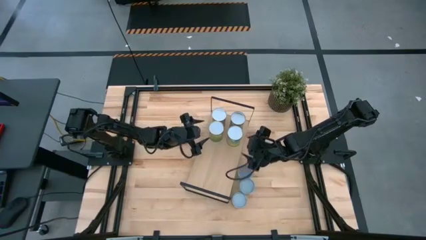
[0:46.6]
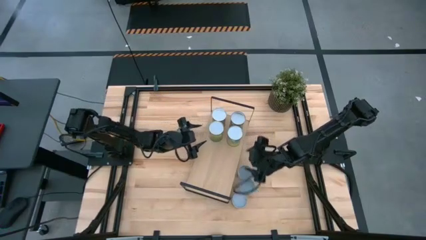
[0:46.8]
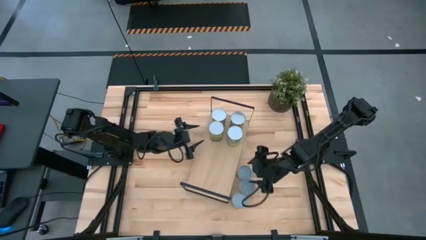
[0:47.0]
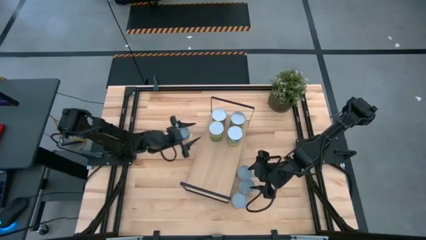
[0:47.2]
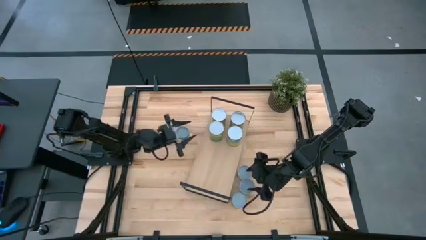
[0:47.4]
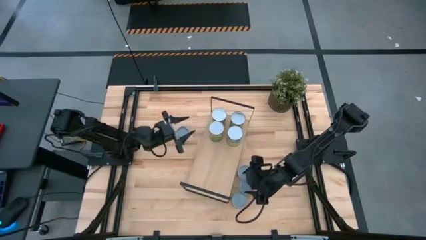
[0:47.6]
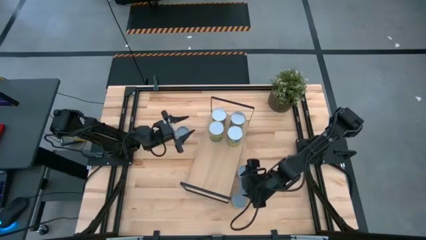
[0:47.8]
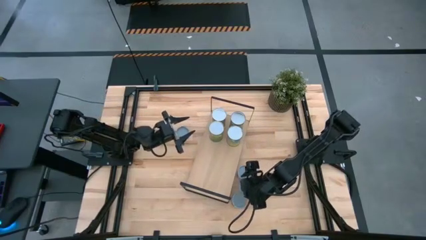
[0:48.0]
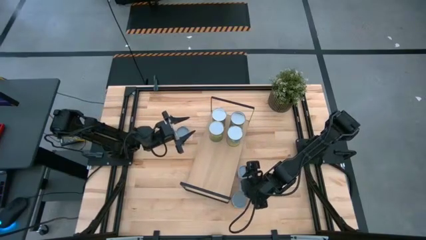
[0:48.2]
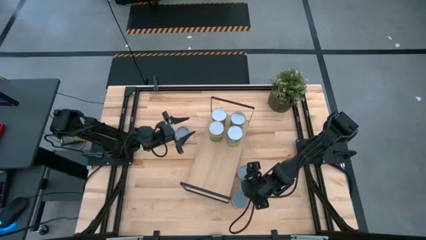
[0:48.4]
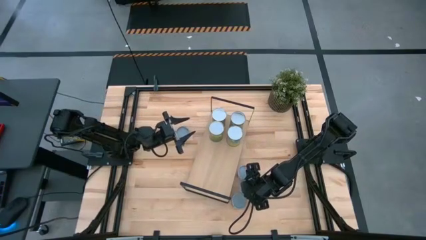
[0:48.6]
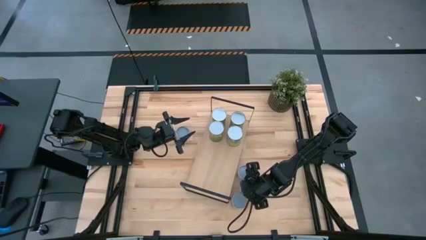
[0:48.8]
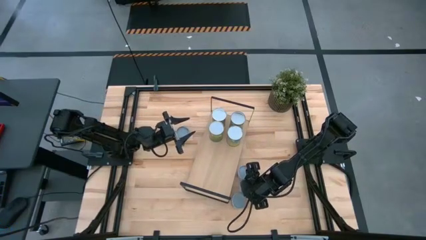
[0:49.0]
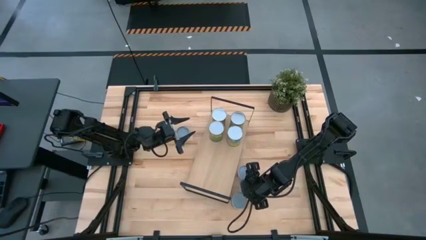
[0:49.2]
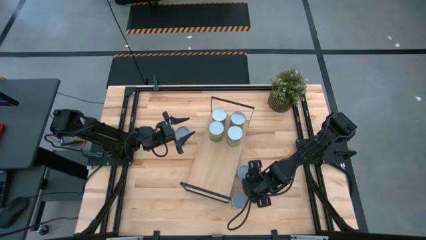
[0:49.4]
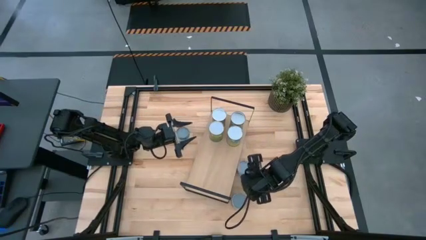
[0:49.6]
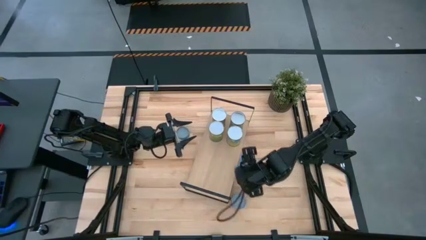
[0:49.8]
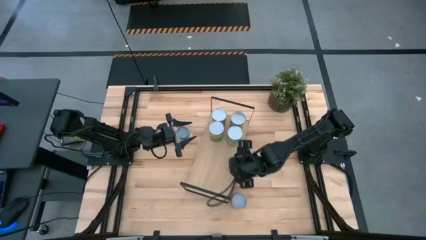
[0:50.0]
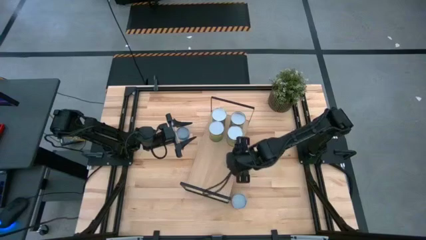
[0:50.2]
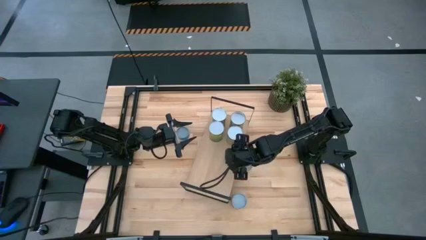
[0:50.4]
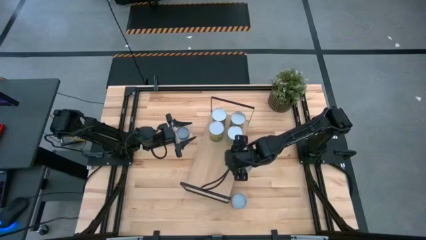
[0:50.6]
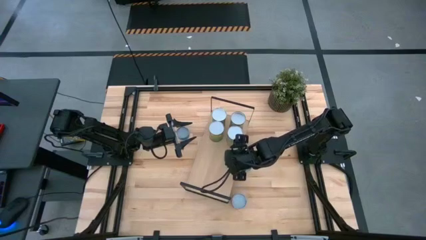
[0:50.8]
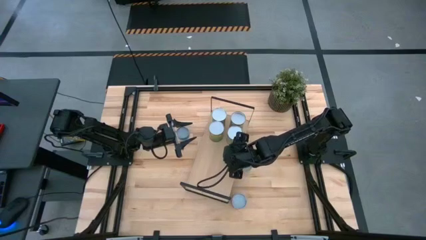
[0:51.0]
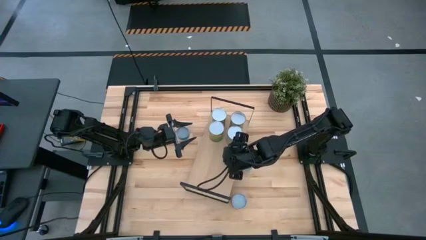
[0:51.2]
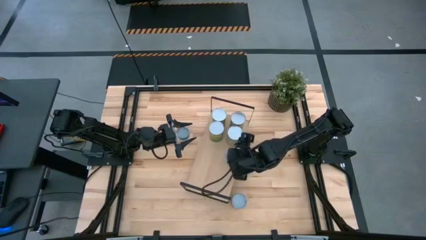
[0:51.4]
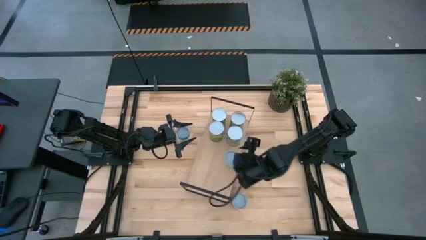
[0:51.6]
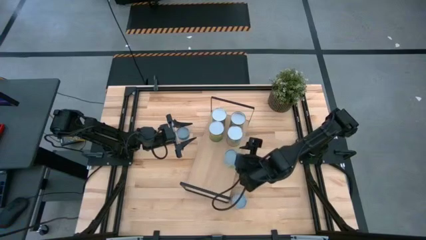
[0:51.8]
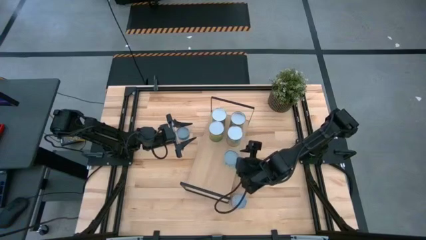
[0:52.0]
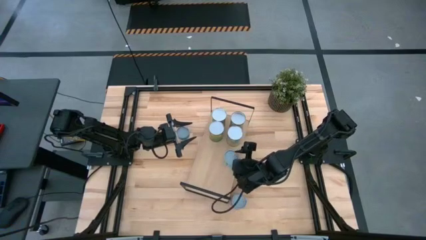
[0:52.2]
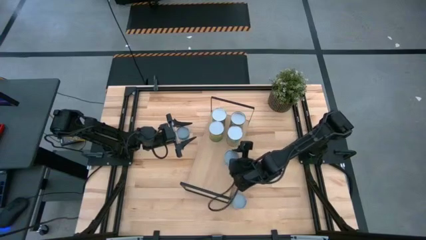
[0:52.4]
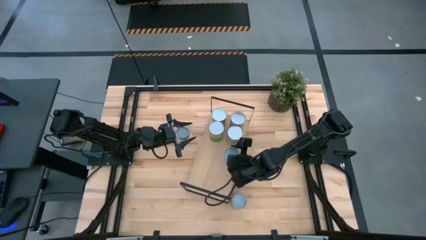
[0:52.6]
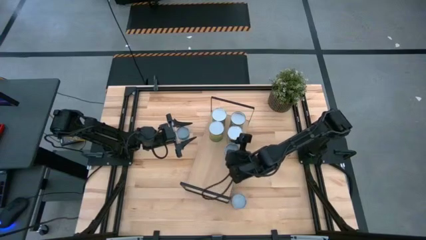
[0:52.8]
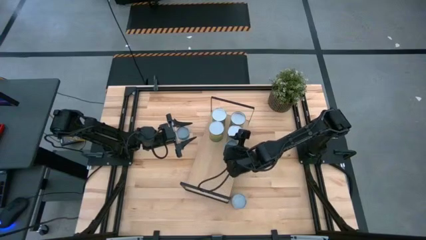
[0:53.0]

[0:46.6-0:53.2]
Task: Pick and place cans onto a shelf
Put the canned mixed vegetables on the shelf

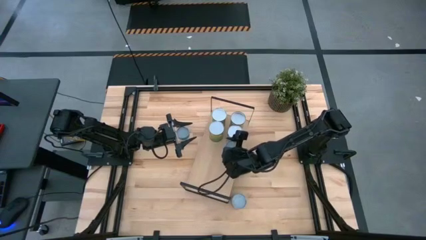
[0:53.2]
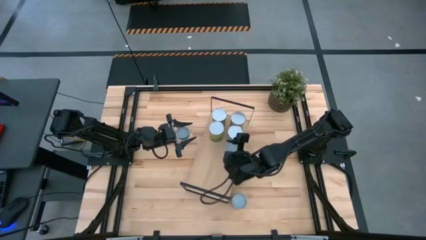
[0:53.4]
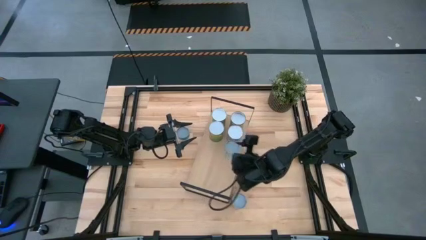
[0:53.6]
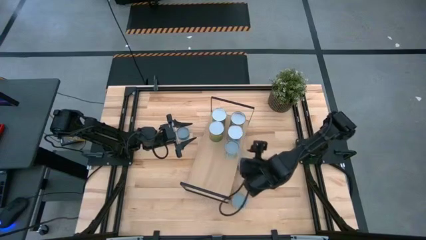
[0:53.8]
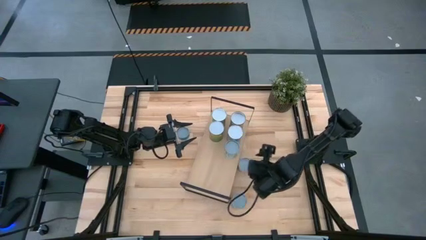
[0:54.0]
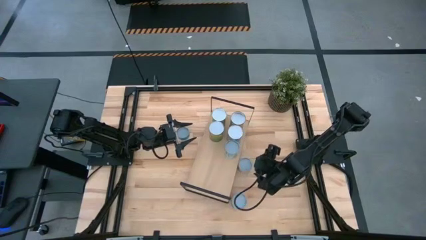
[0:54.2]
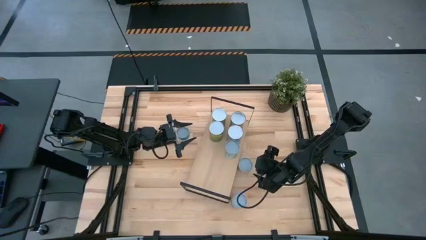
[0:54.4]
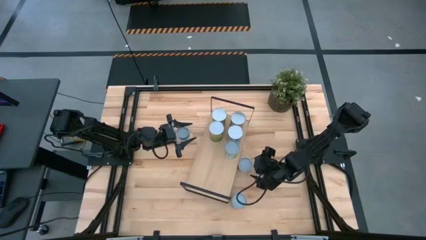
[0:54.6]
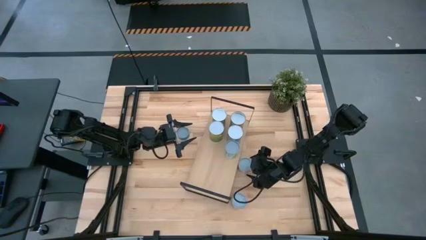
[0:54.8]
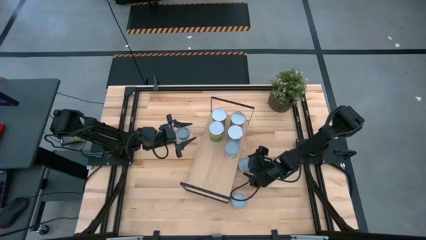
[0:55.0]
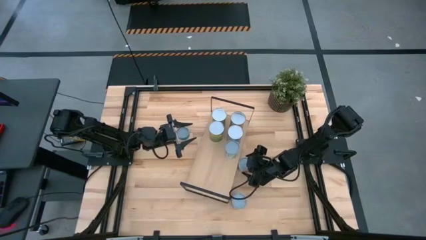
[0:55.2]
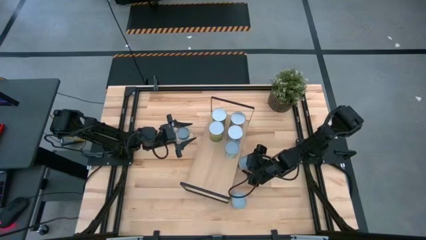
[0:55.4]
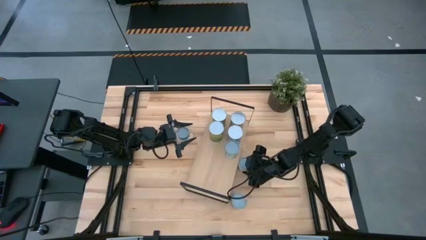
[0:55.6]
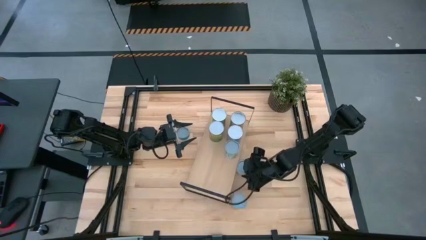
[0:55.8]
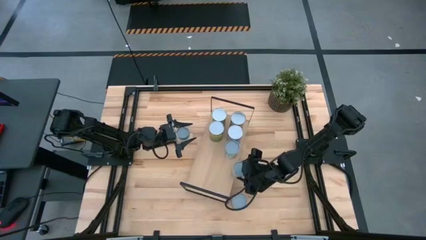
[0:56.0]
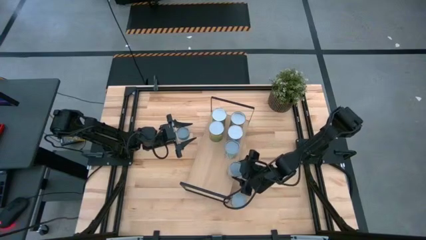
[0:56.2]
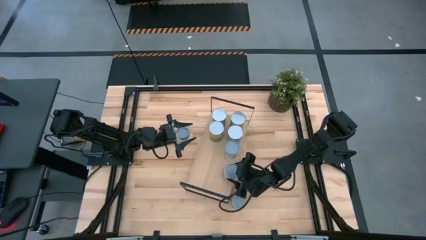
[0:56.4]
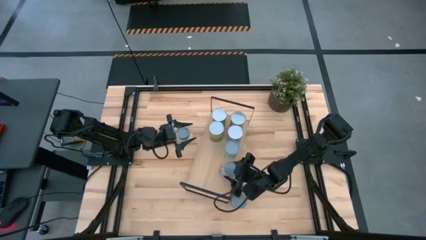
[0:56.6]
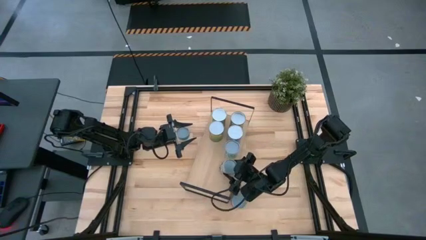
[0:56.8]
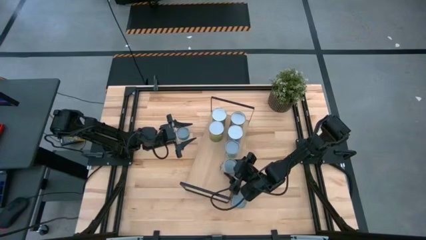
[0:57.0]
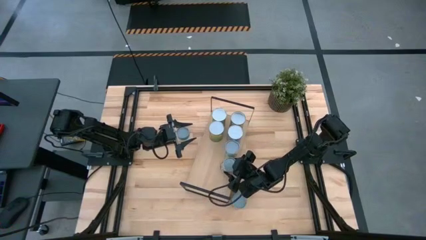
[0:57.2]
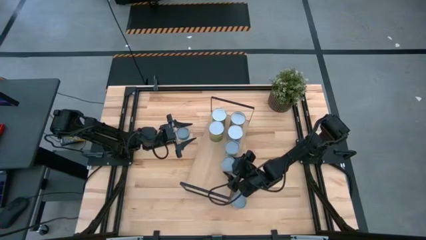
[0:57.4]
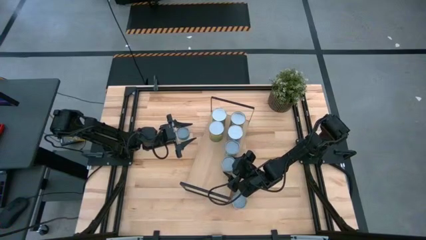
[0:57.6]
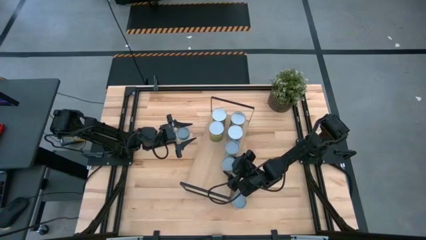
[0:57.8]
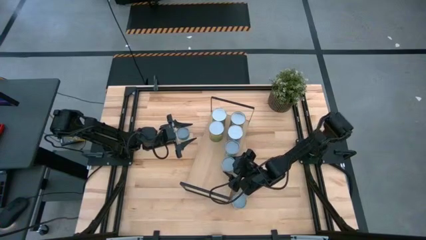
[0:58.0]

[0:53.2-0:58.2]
Put the small canned peas on the shelf

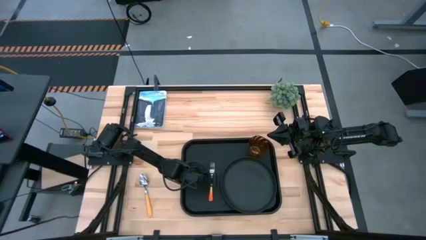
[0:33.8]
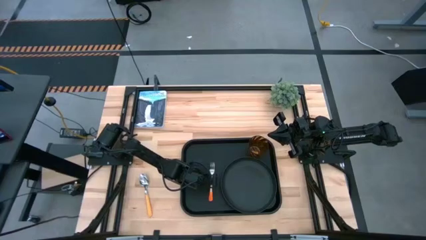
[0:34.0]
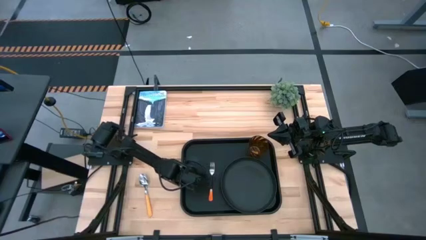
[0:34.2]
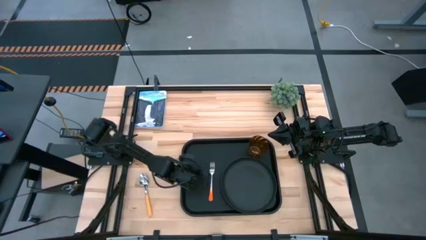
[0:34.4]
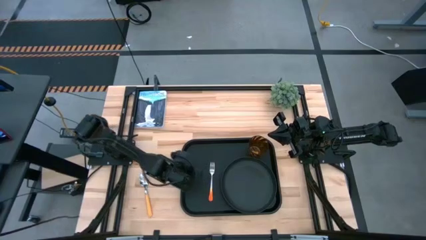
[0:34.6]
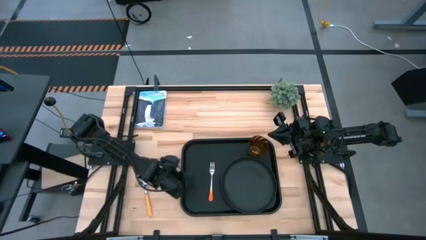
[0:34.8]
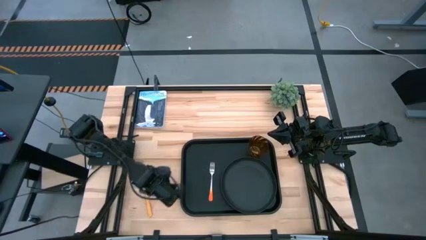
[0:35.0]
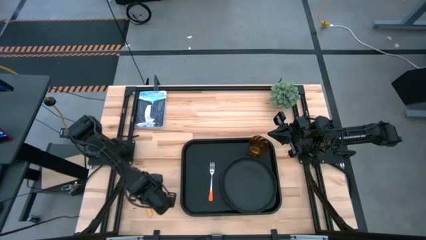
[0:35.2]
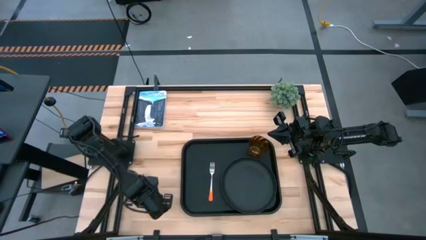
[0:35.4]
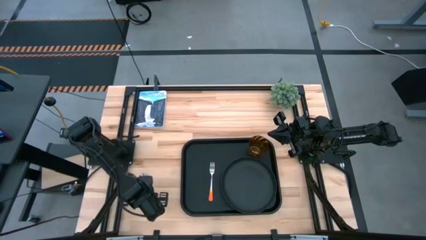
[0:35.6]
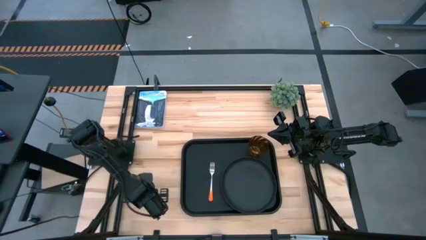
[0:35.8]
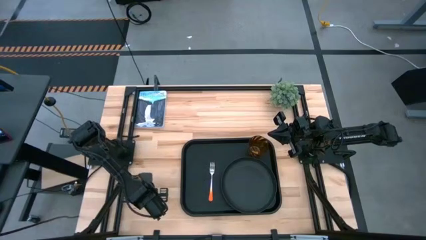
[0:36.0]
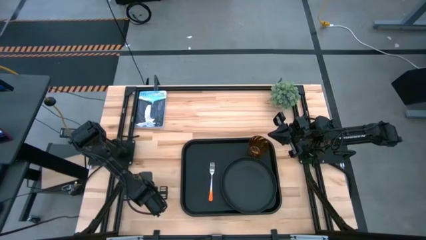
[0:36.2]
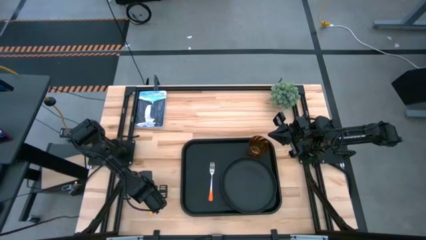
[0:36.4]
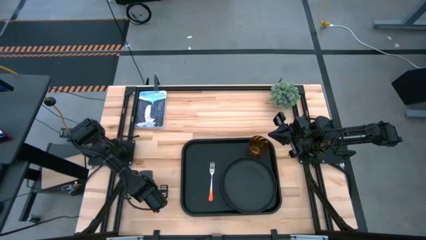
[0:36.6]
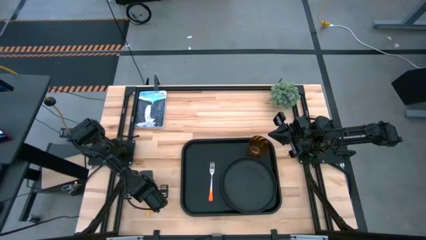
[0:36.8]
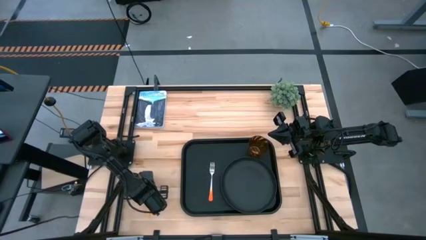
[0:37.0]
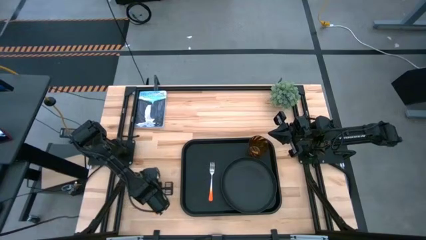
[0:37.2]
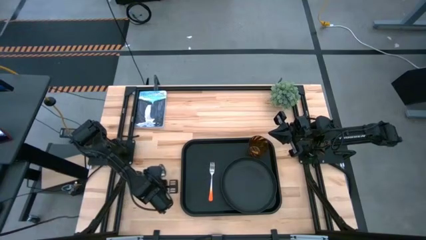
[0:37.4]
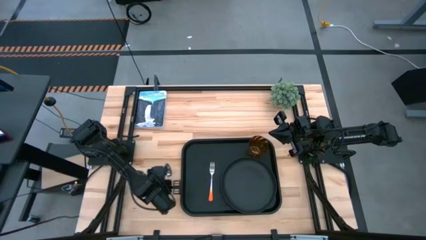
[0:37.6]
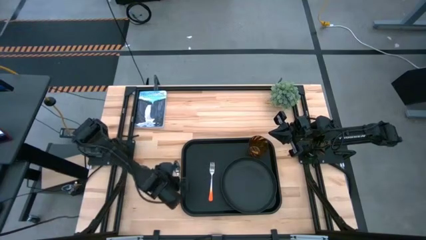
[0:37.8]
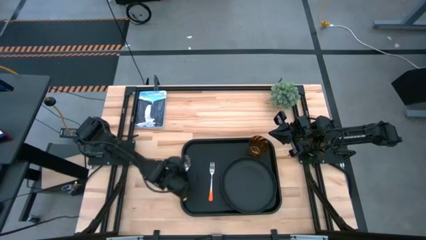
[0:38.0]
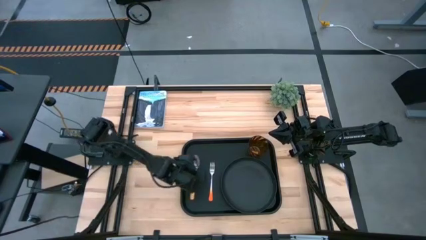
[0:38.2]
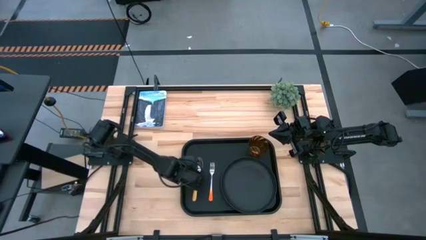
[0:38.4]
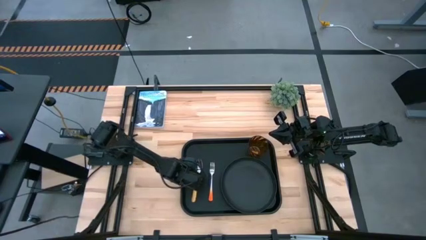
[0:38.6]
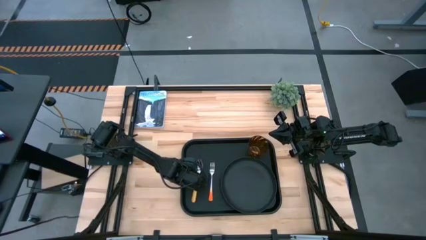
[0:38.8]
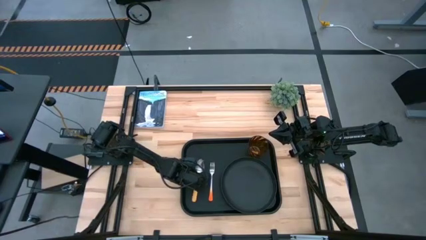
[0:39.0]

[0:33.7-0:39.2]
Task: Pick and place plate/cup/fork/spoon on tray
Put the yellow spoon on the black serving tray to the left of the orange fork
